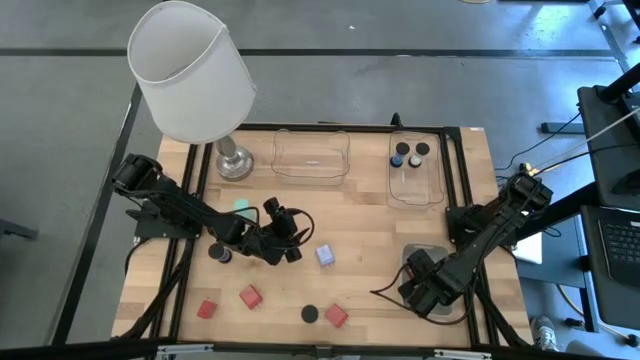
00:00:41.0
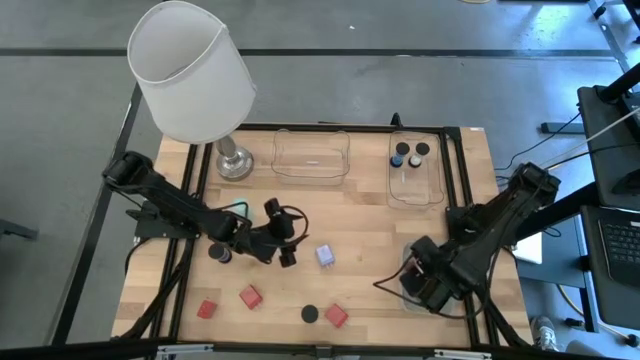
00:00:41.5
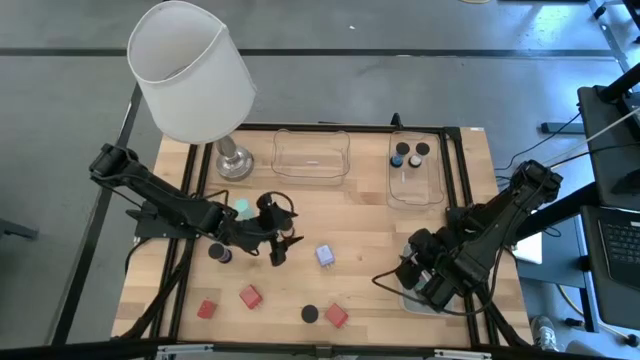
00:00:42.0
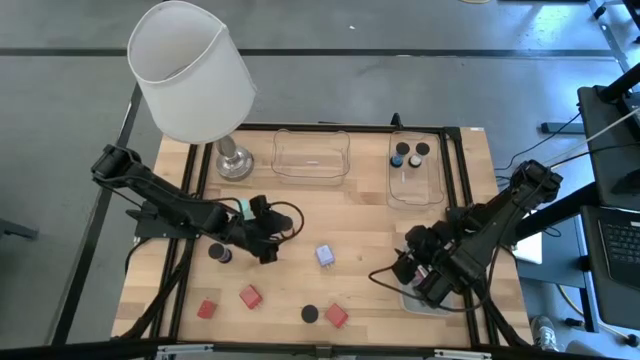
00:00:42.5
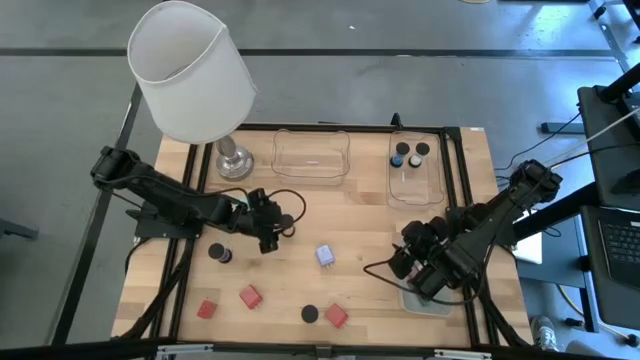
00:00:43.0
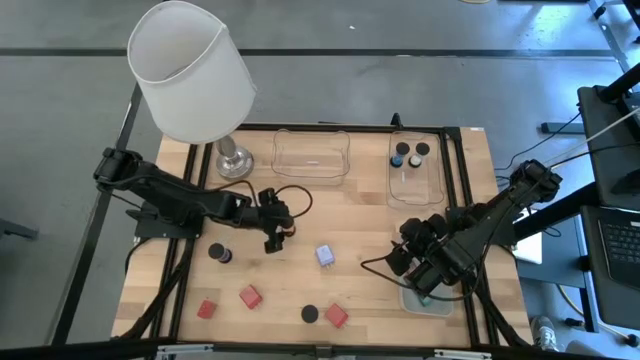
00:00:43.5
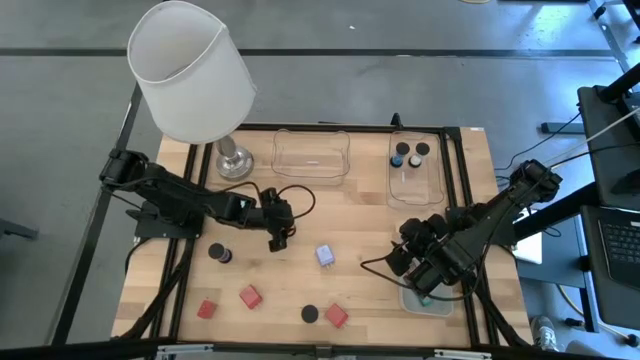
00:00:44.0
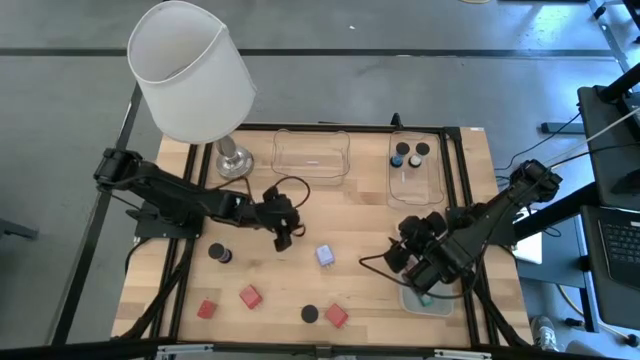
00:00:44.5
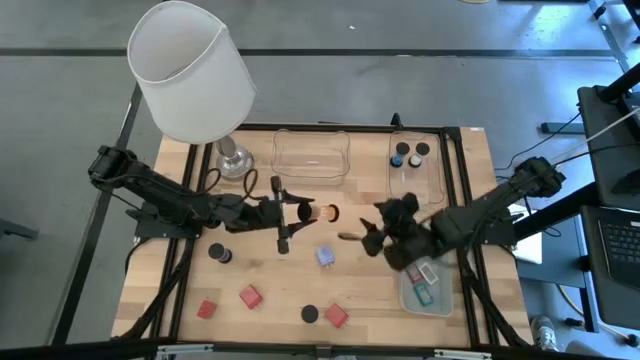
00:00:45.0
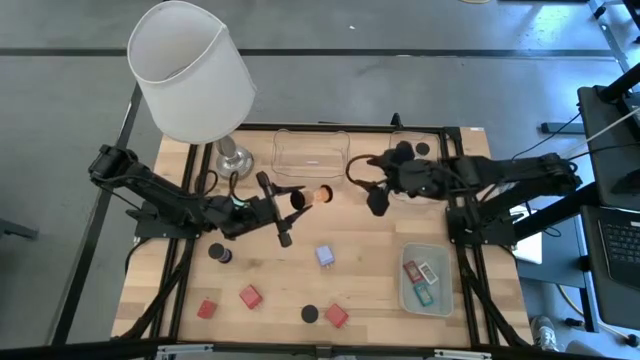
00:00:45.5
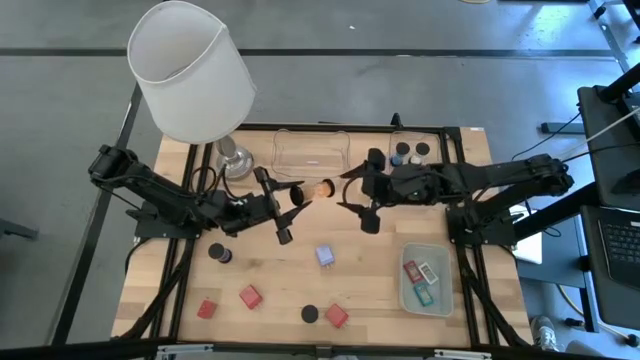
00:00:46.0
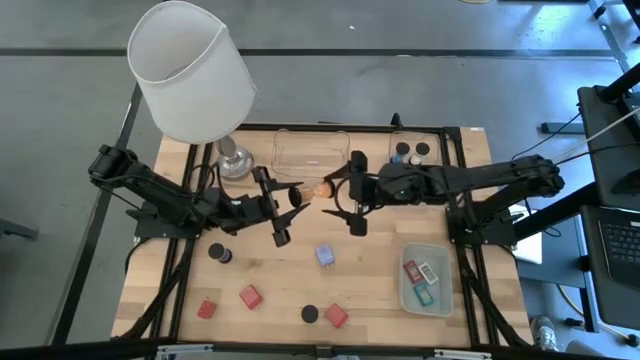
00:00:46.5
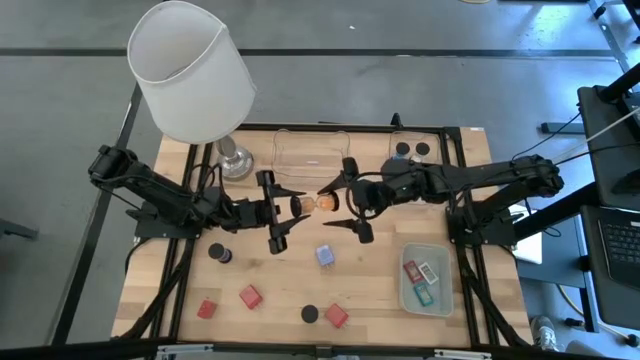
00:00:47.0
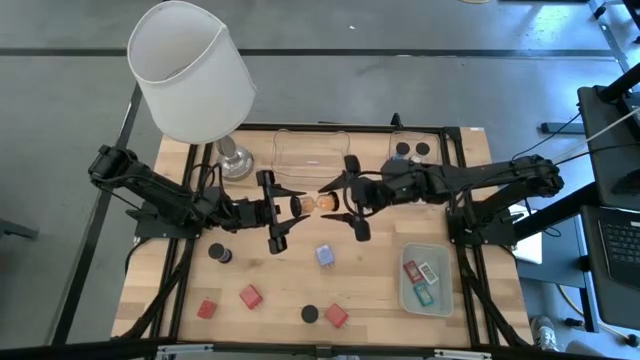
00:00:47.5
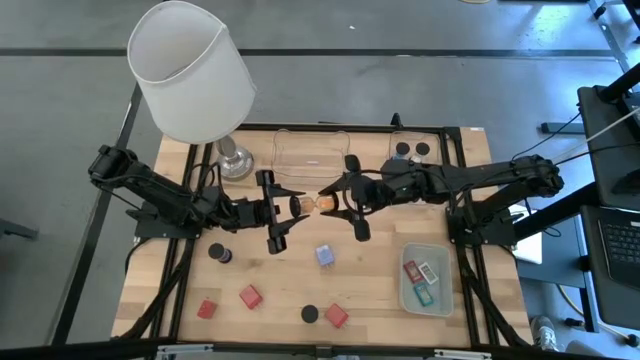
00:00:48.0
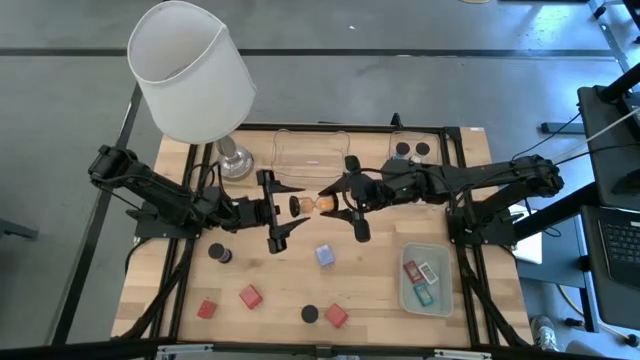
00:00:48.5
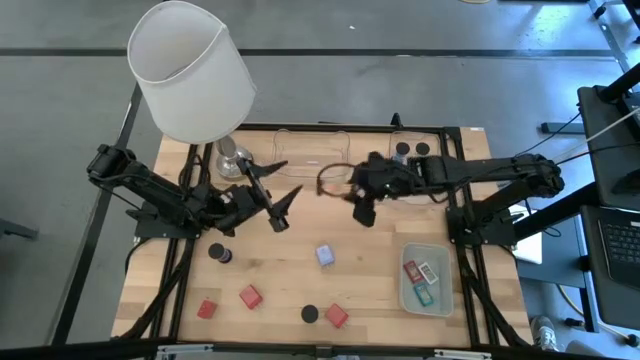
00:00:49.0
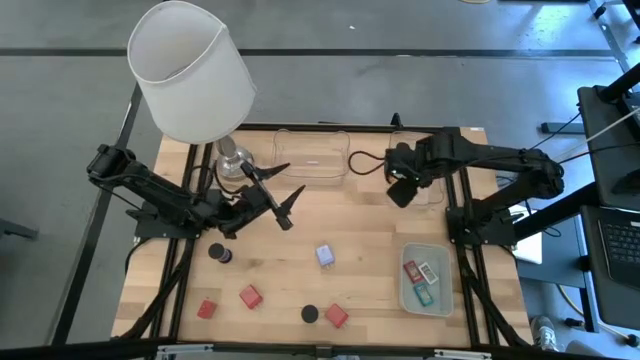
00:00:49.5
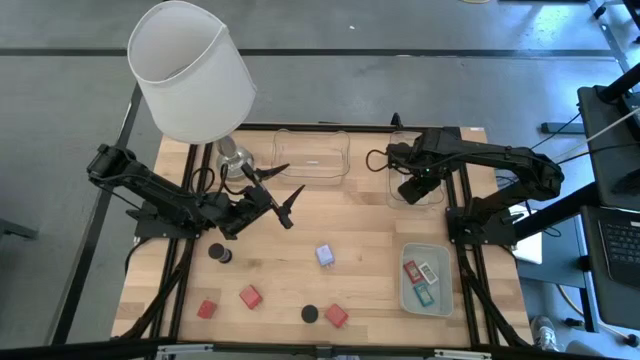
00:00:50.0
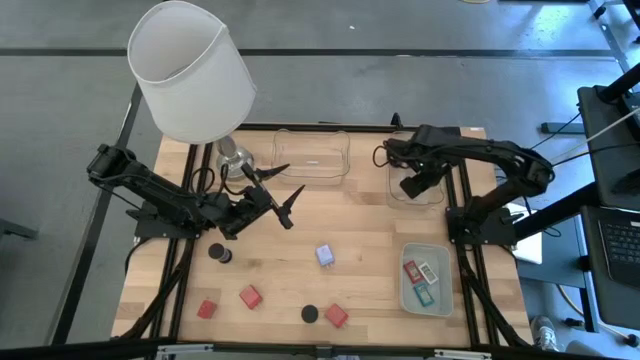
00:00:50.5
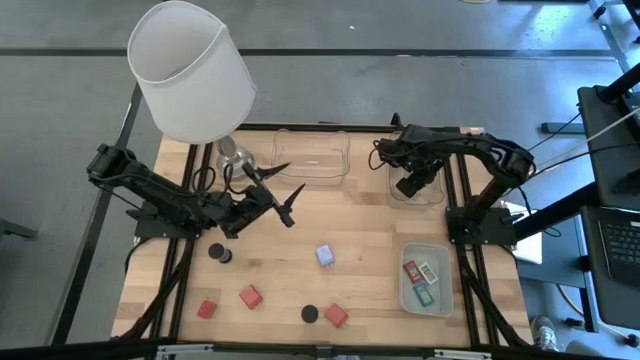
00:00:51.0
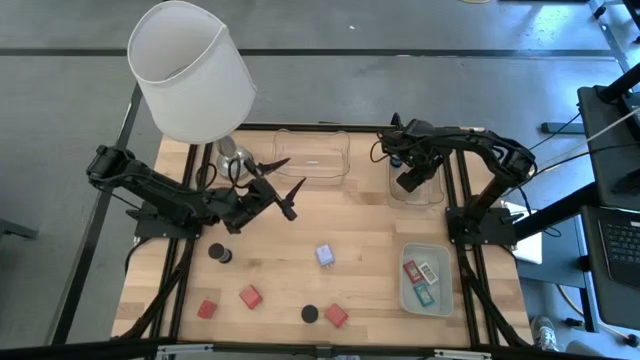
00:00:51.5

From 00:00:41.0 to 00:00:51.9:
Task: Pick & Place Office items
Put the orange hourglass into the right transparent bin

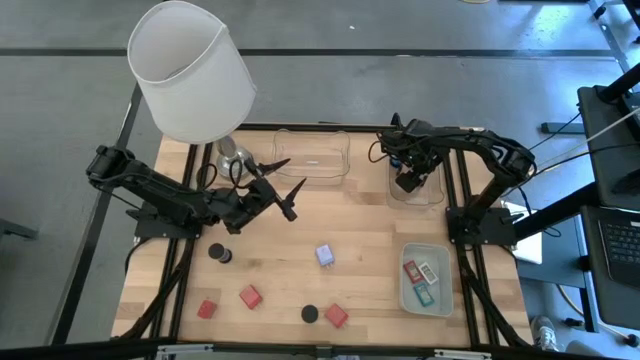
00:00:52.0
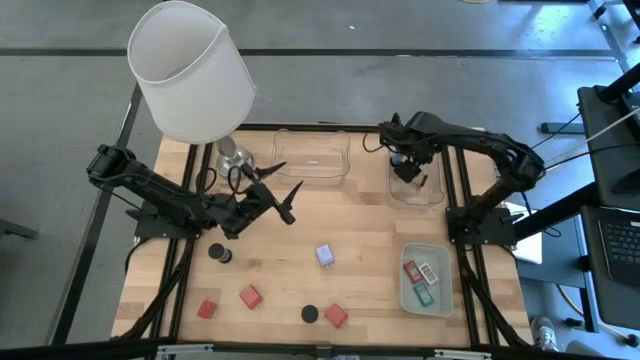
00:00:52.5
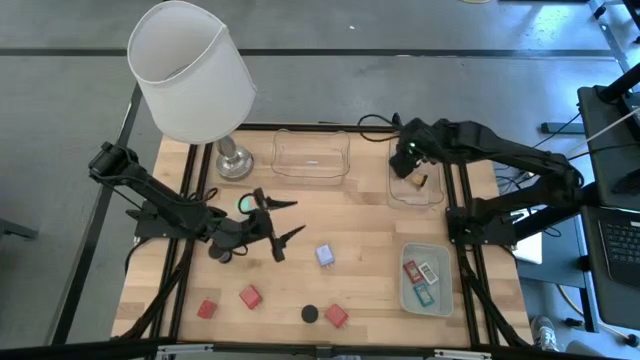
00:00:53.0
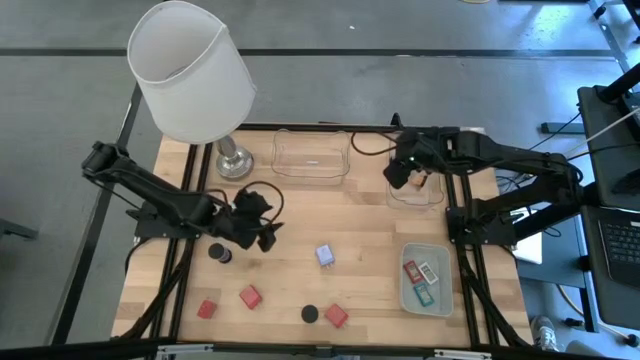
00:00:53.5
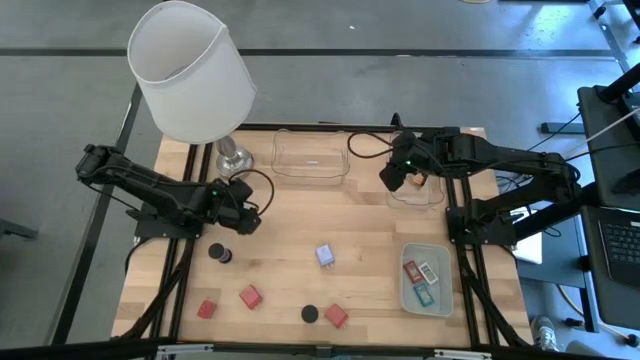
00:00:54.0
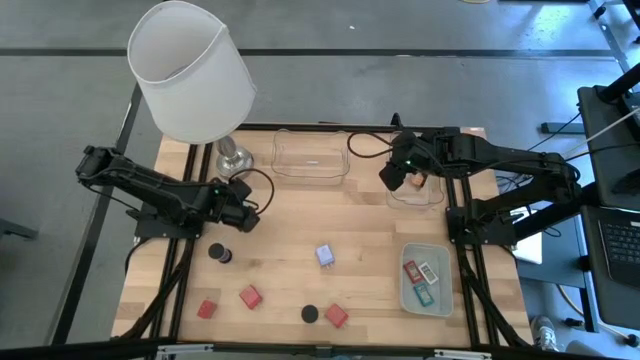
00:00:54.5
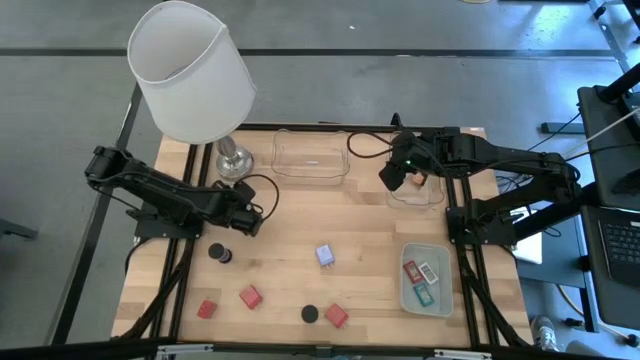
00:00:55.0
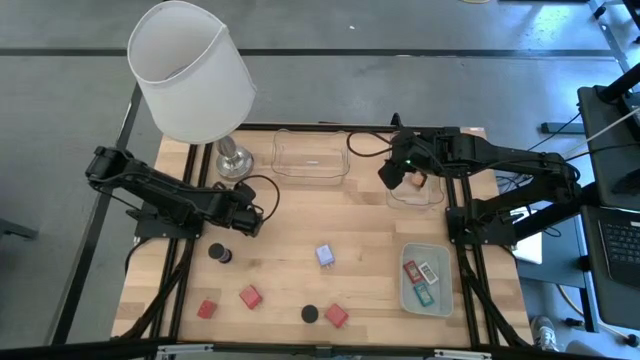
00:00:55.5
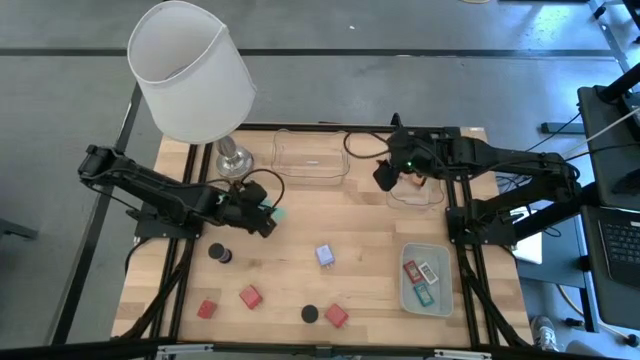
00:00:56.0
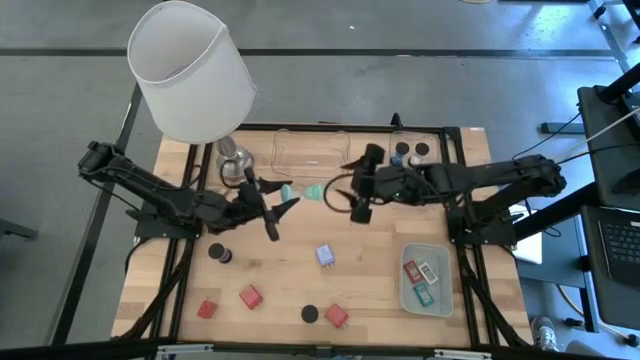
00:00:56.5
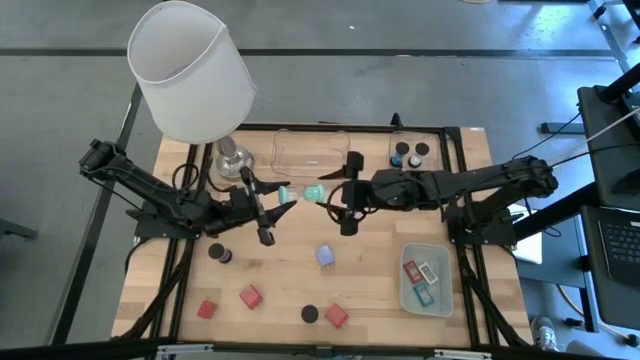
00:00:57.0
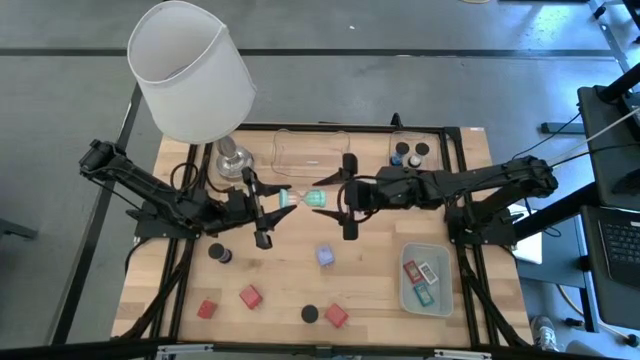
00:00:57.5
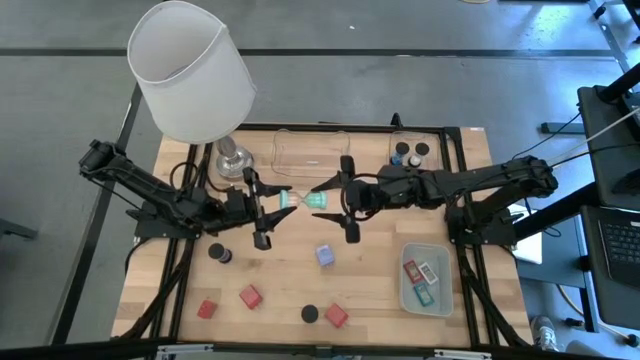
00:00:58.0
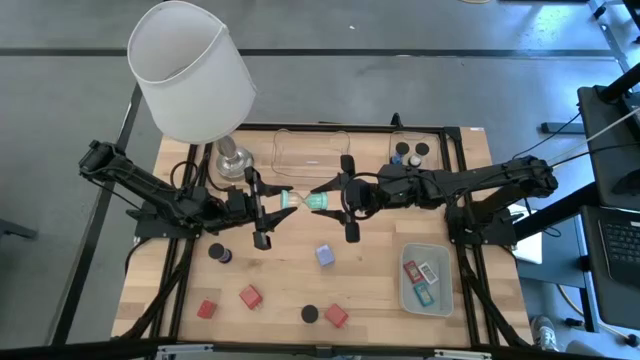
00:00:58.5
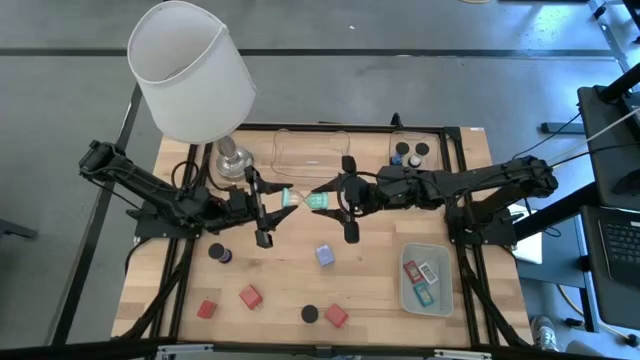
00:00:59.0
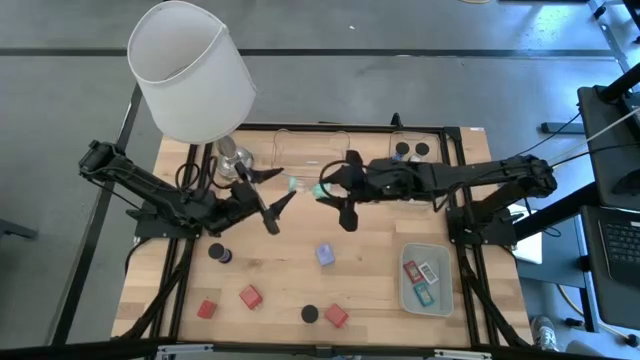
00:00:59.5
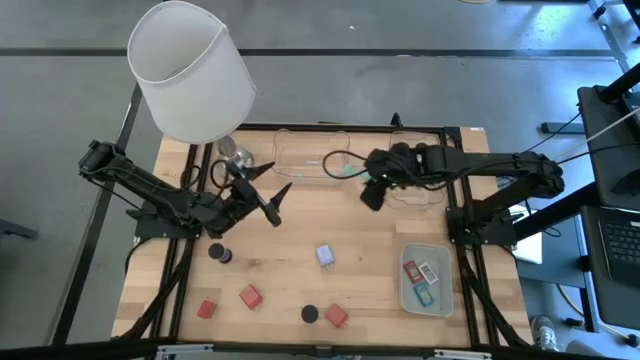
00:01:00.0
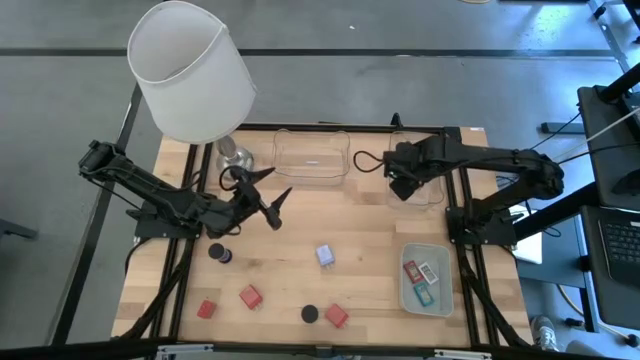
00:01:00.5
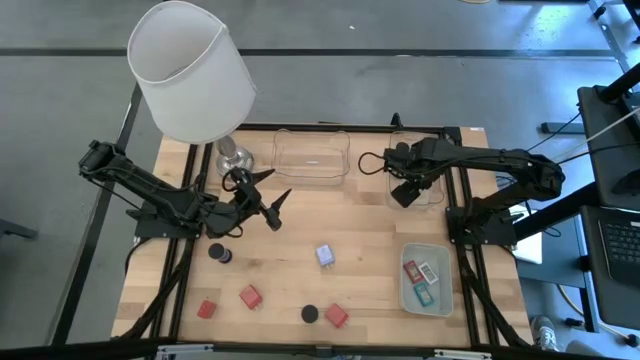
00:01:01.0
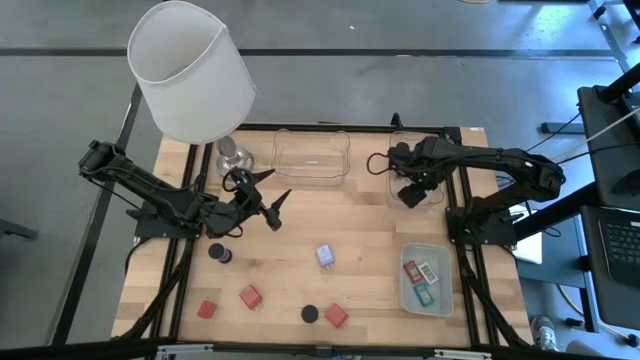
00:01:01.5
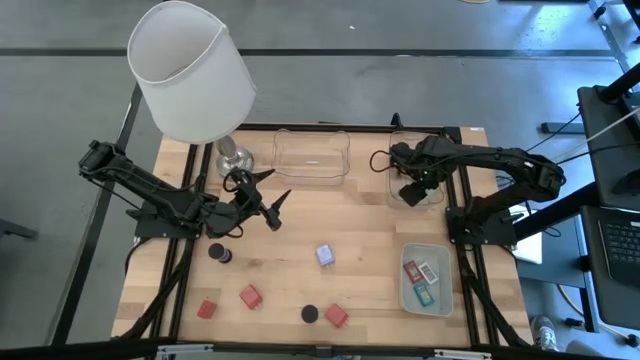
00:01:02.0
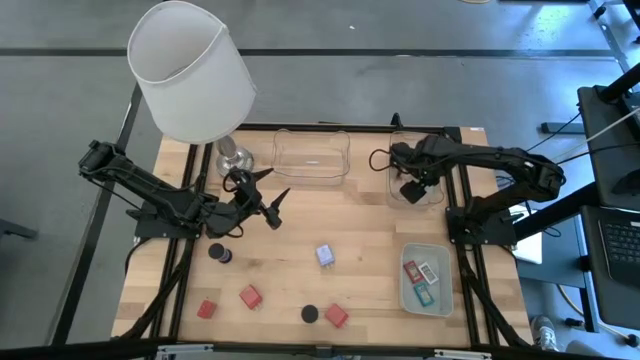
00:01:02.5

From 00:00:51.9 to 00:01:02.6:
Put the green hourglass into the right transparent bin

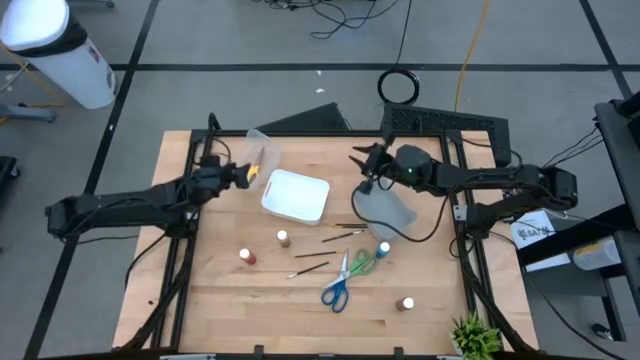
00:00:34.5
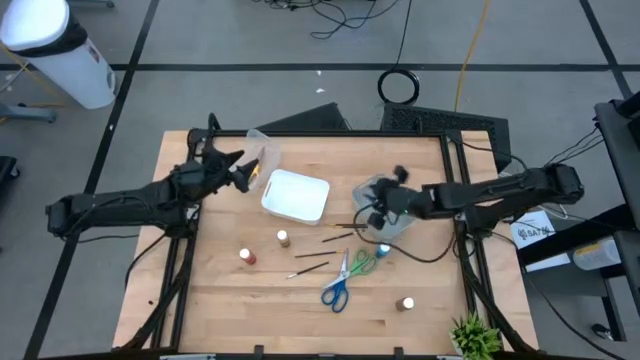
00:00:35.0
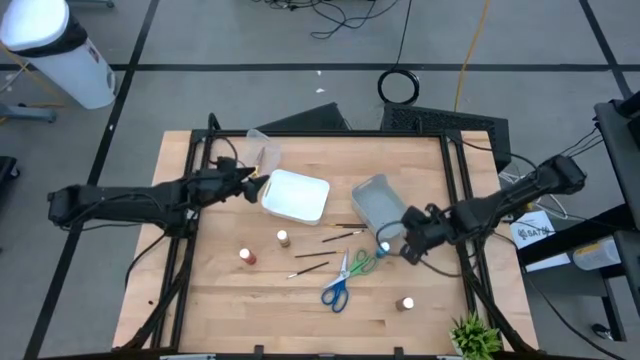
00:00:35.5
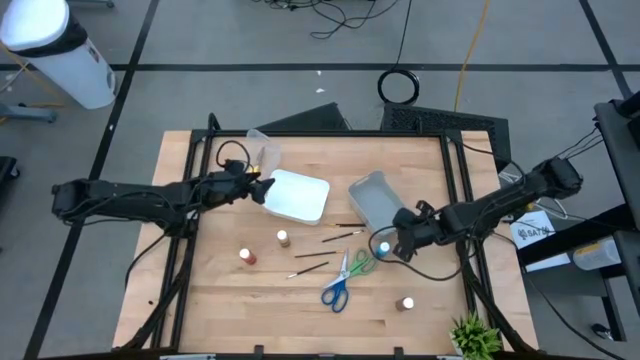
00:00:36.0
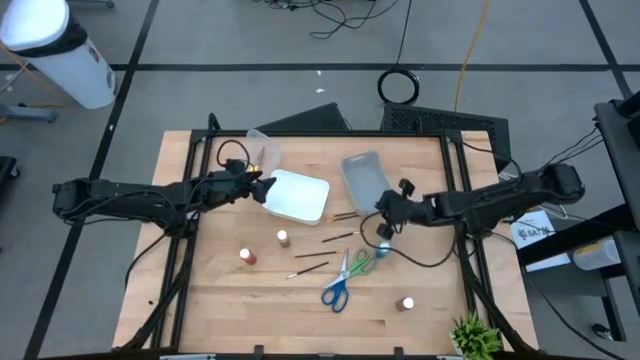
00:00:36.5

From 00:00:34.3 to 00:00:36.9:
Task: Pick & Place Paint Supplies
Adjust the gray bin
